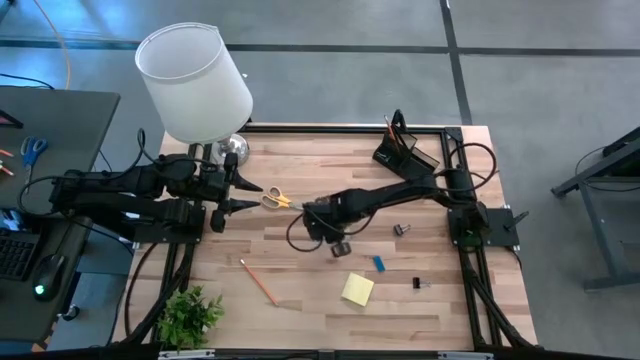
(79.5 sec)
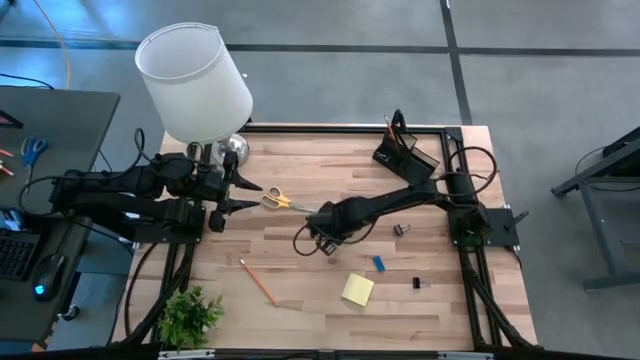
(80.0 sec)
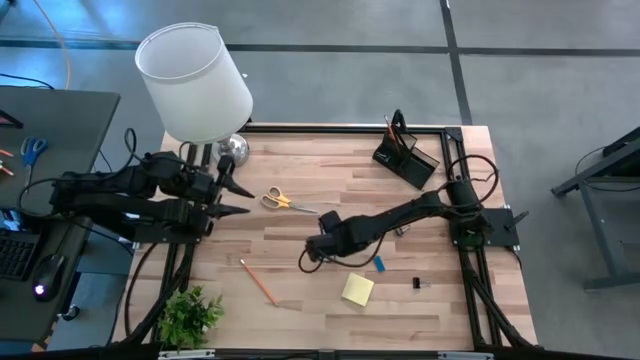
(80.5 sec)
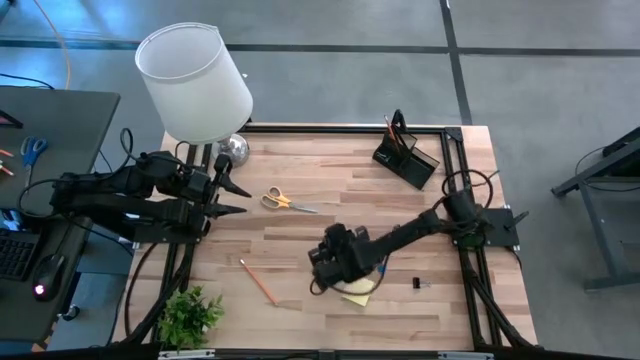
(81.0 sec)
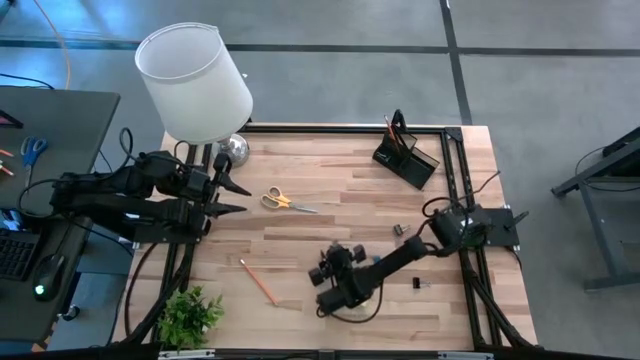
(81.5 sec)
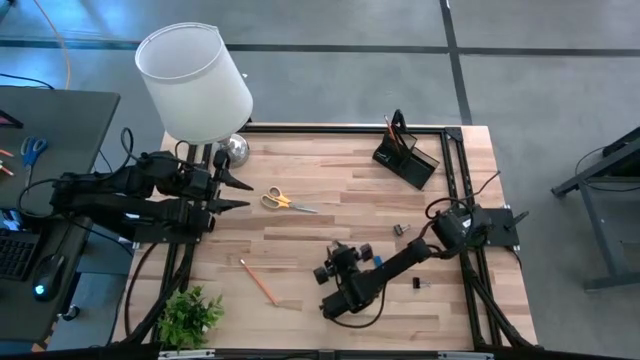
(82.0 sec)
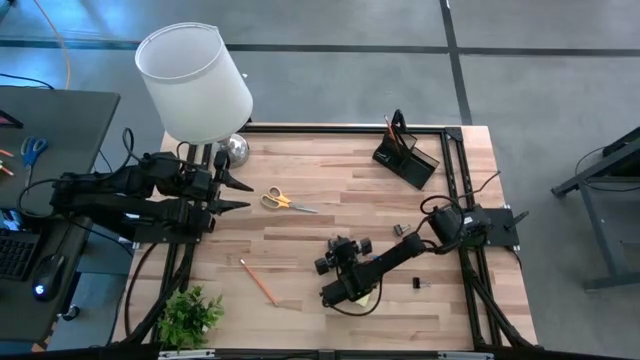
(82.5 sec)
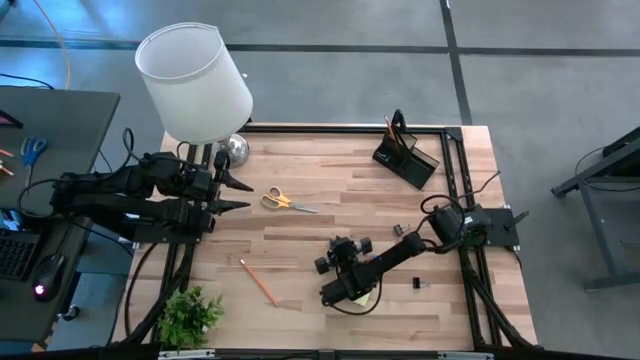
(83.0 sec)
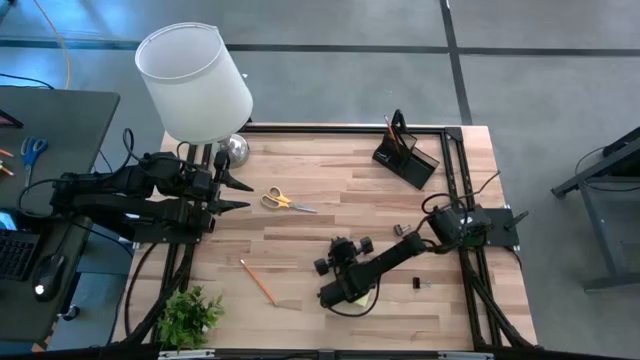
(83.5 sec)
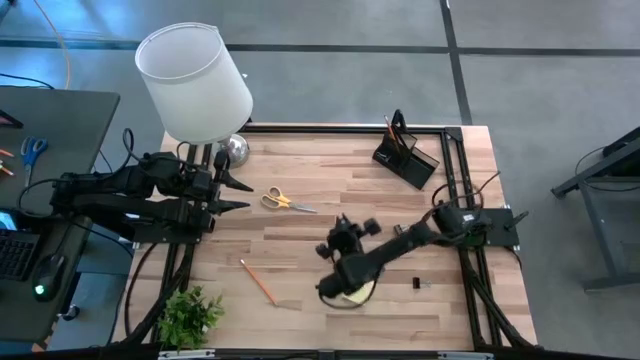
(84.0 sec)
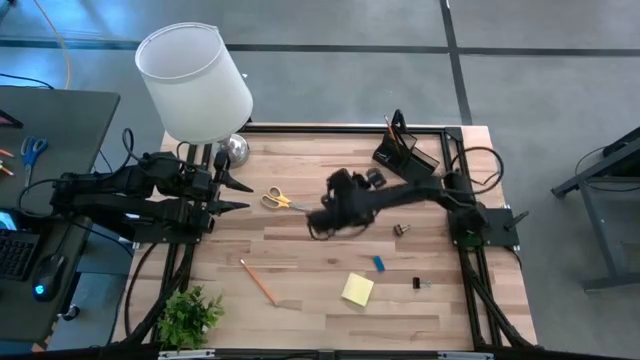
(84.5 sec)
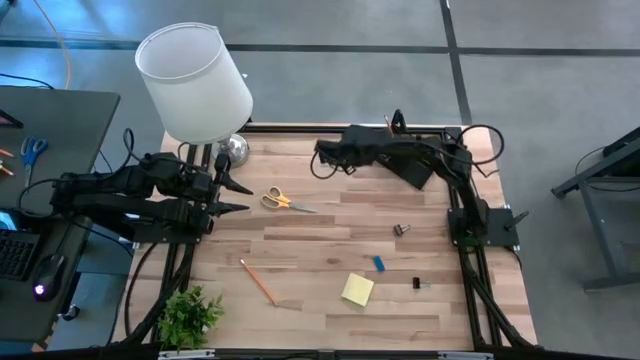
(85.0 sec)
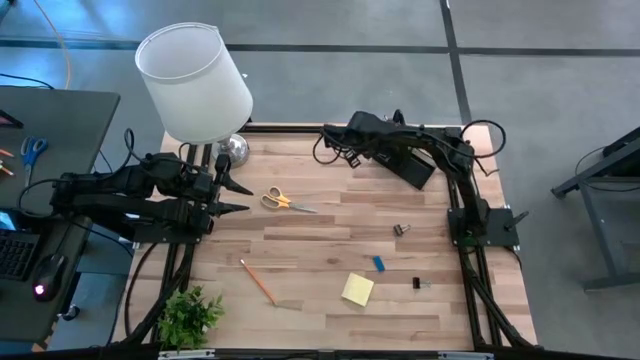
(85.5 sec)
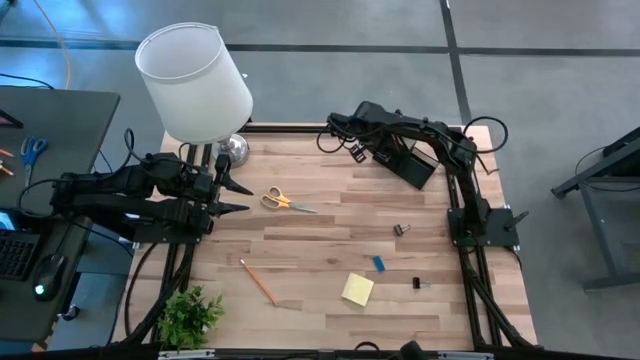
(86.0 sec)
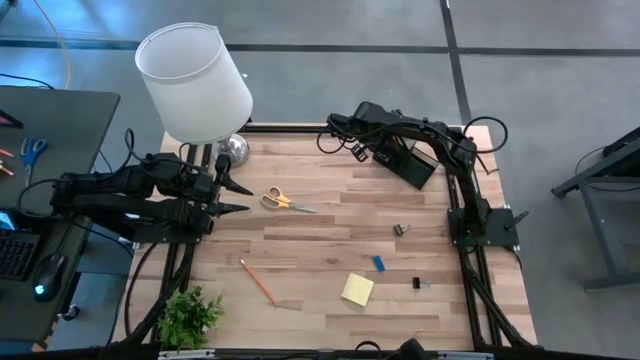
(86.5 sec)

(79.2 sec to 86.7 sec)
Task: Pick and place office supplies into organizer
Put the green binder clip into the mesh desk organizer

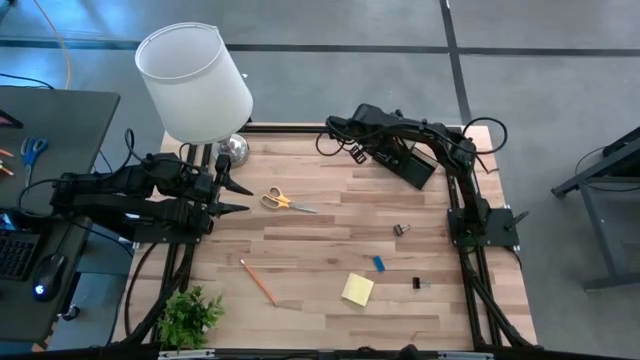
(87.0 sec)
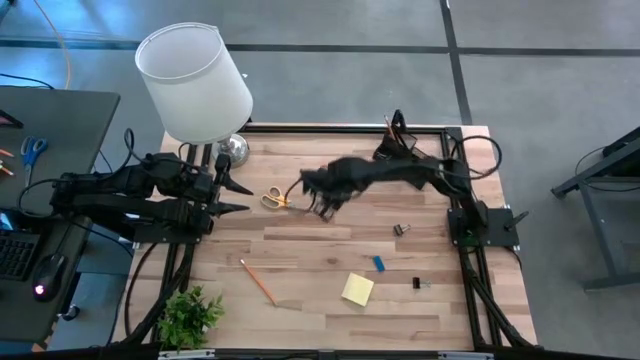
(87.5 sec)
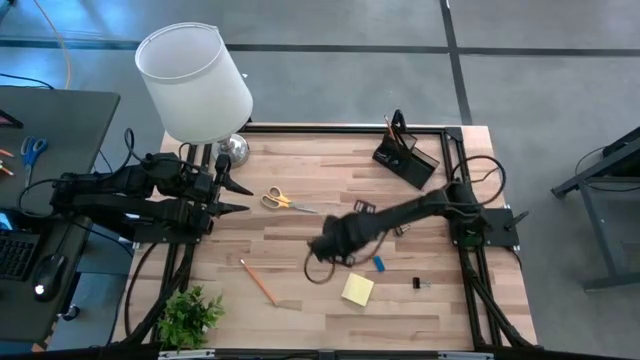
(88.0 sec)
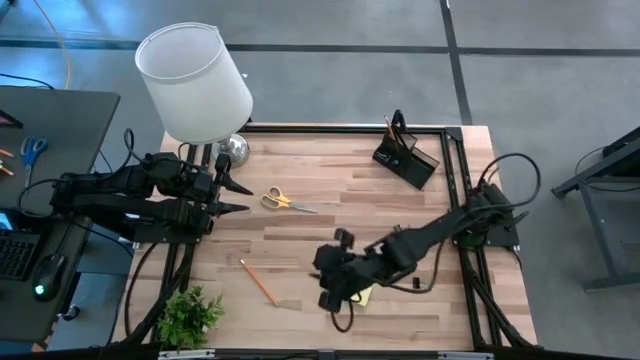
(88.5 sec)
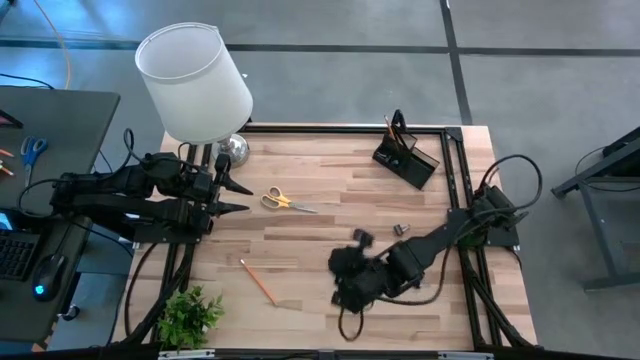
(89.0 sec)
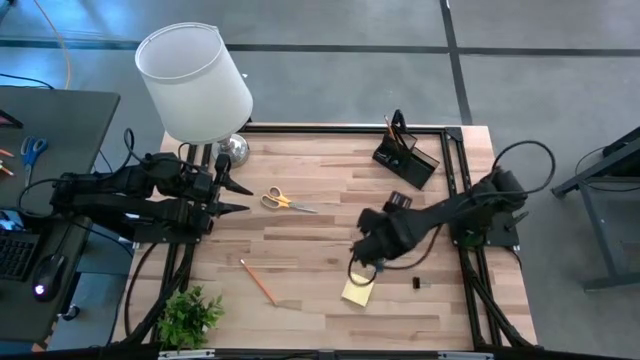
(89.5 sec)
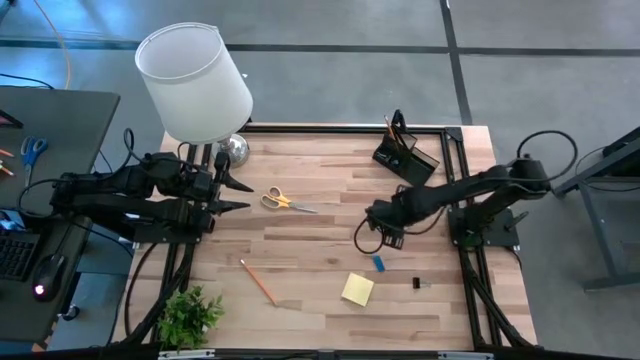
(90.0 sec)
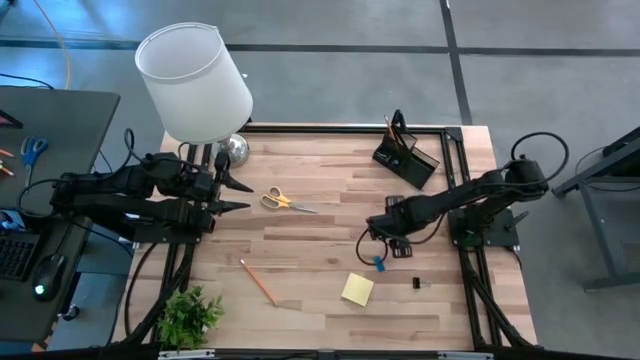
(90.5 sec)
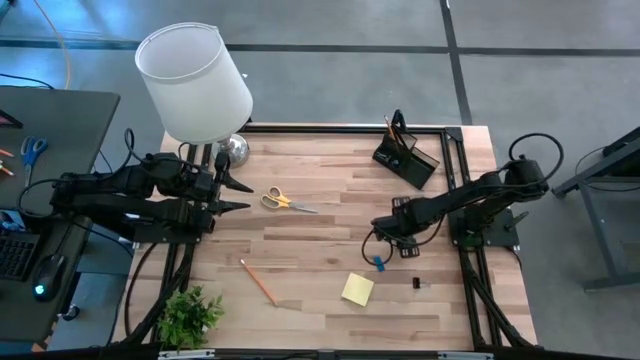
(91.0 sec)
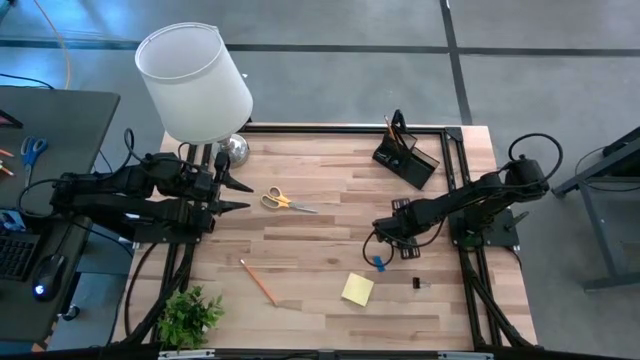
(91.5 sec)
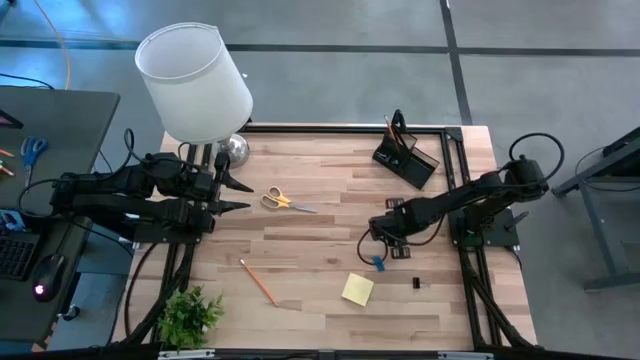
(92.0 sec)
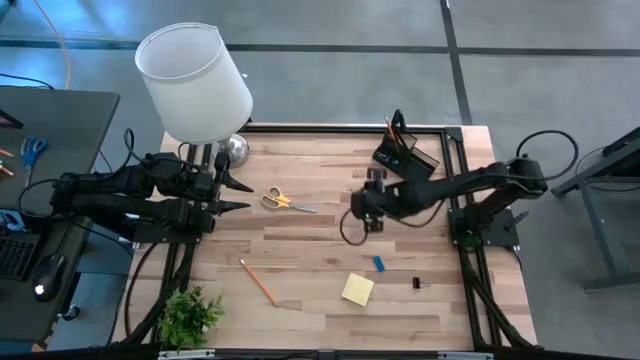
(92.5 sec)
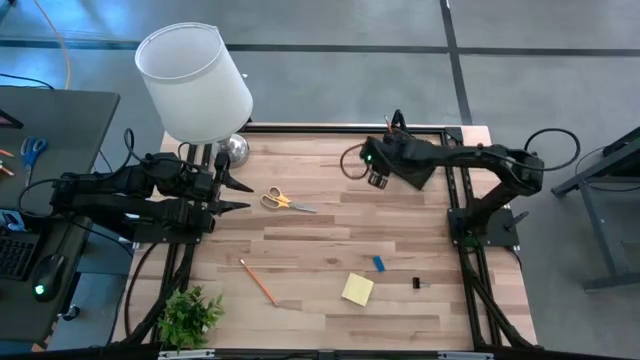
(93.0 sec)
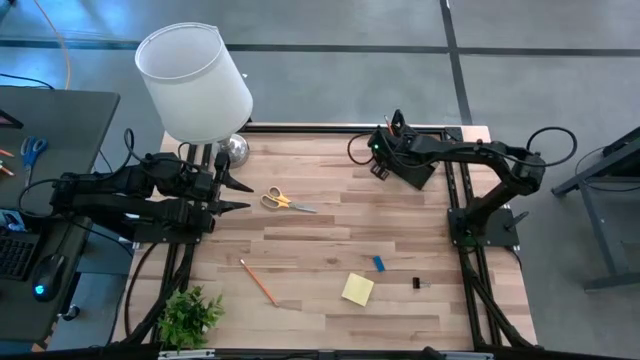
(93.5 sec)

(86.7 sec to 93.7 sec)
Put the top black binder clip into the mesh desk organizer

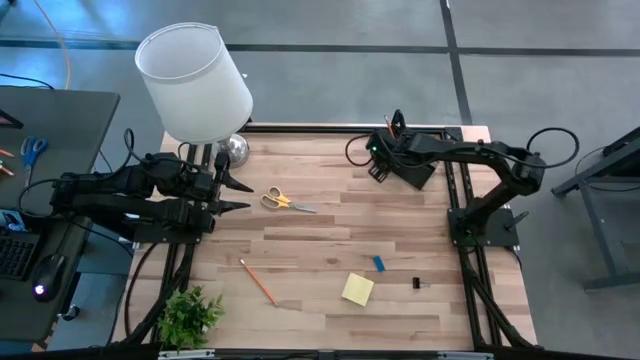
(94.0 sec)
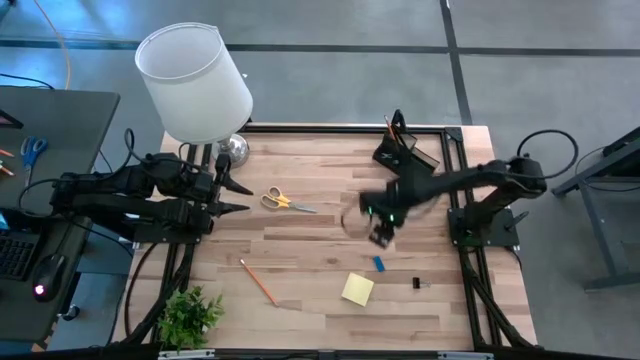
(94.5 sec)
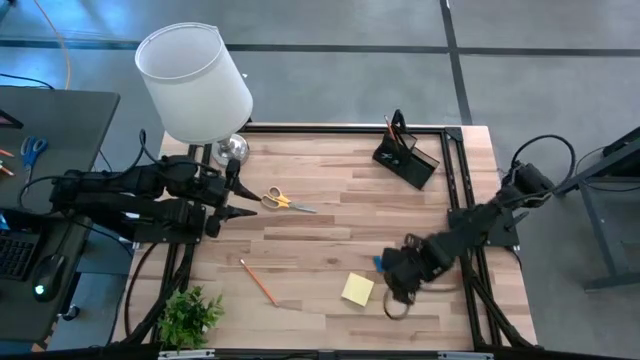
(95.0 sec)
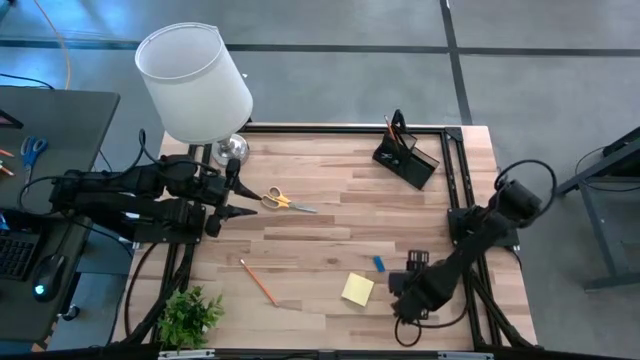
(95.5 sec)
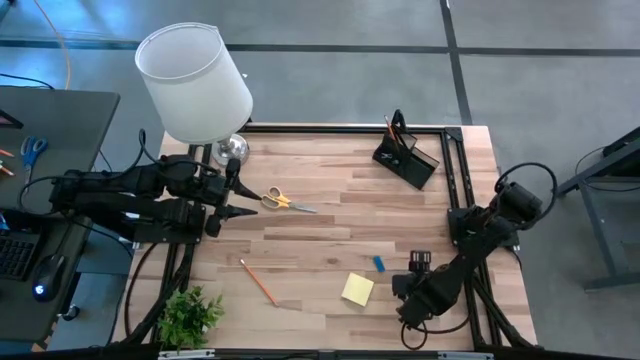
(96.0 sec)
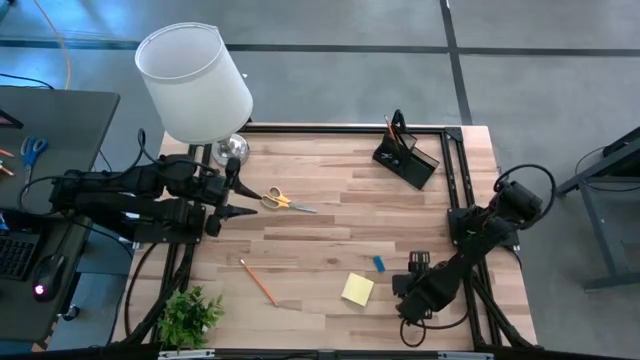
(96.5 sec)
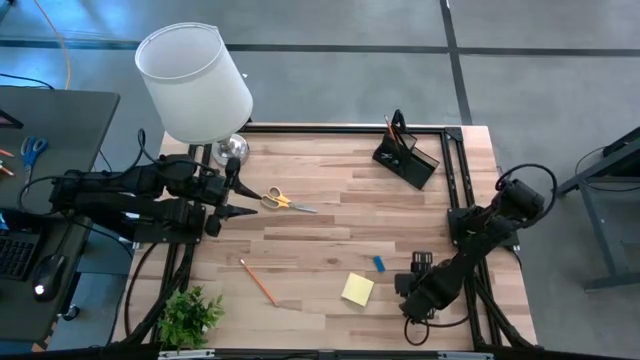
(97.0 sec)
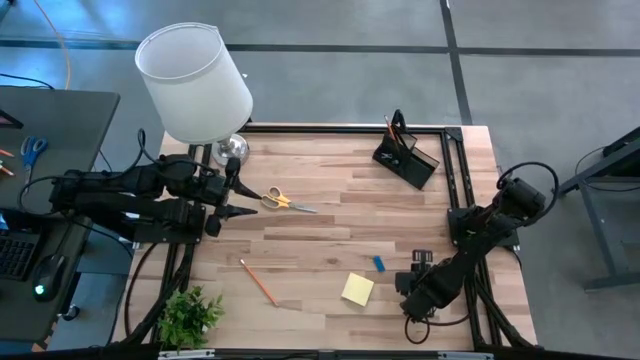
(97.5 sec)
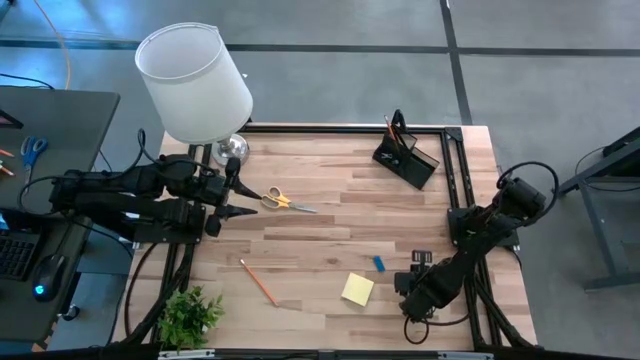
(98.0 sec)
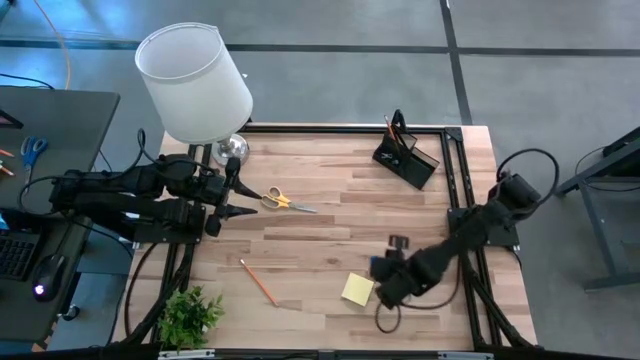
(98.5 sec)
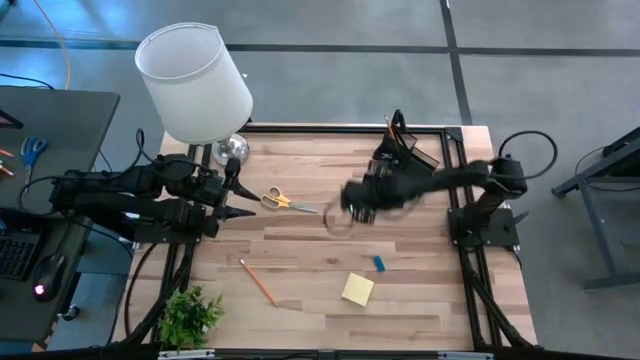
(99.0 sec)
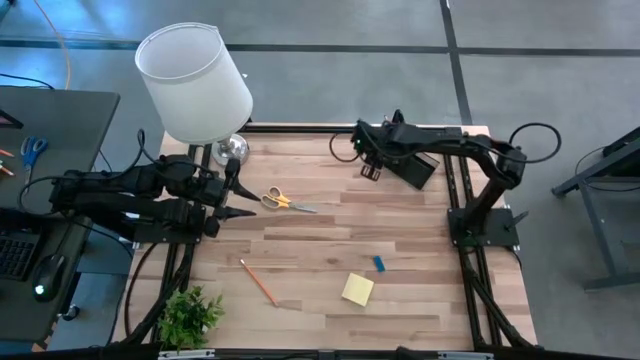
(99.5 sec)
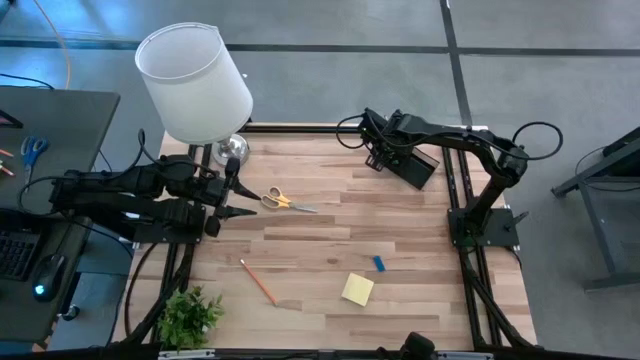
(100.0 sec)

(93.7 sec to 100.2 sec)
Put the black binder clip into the mesh desk organizer
